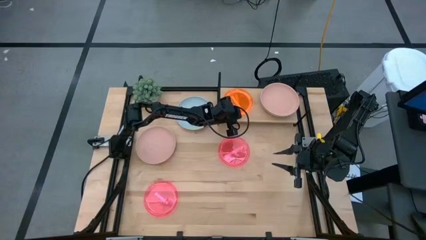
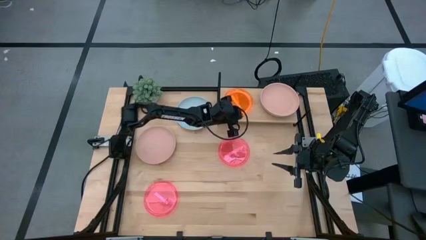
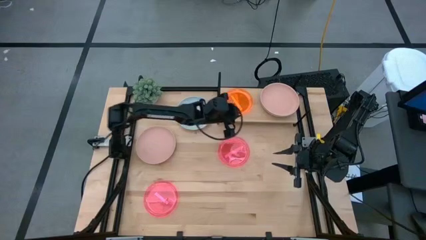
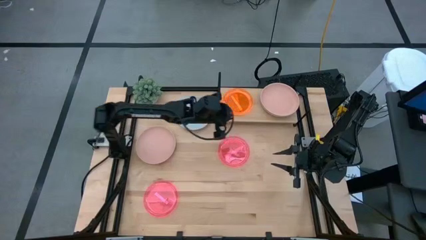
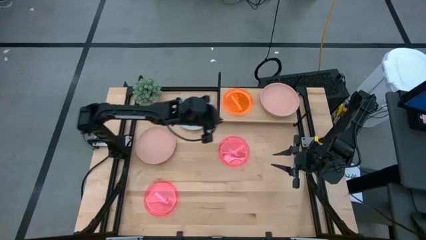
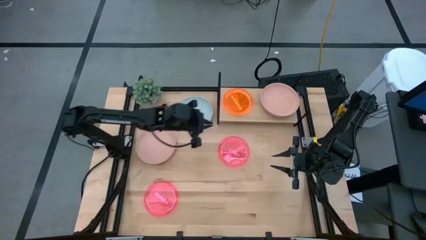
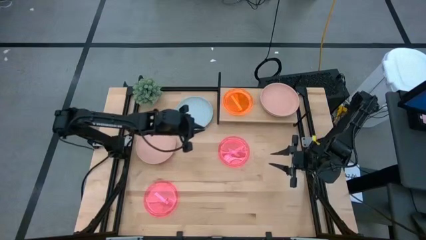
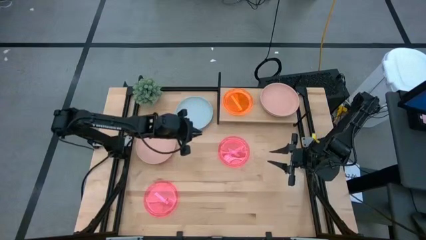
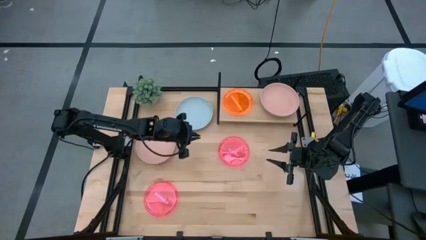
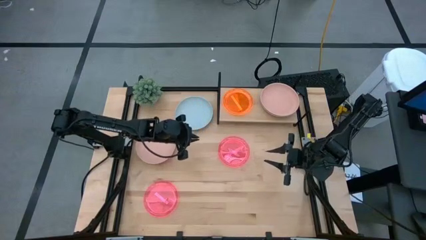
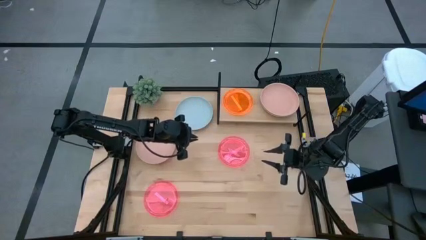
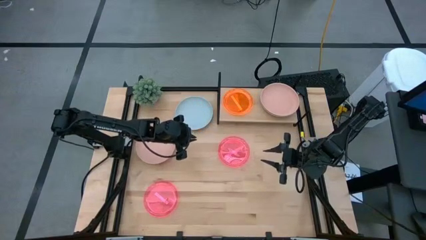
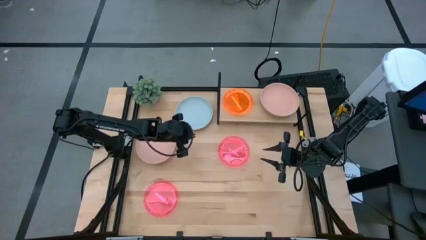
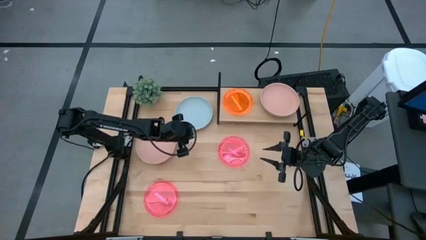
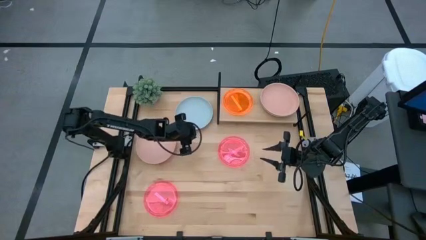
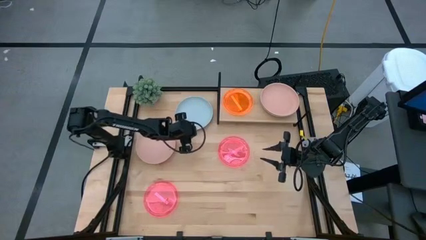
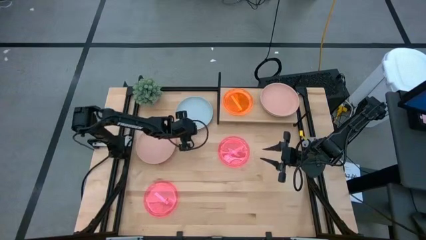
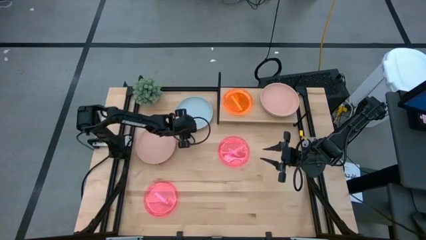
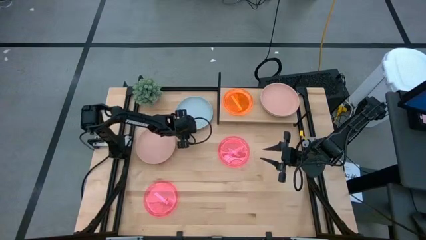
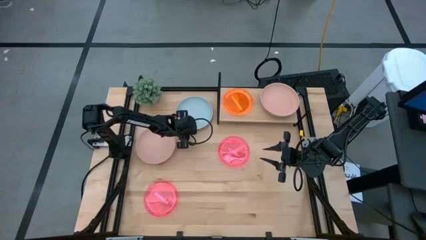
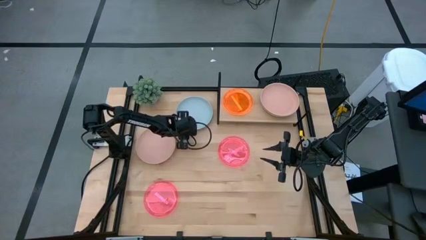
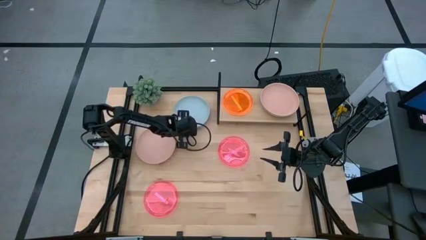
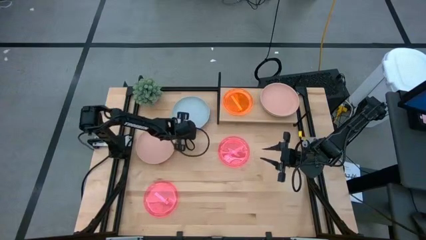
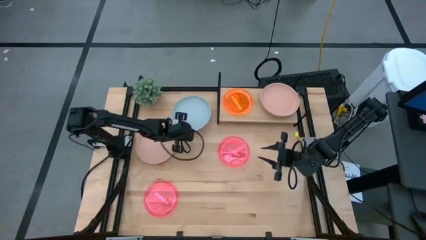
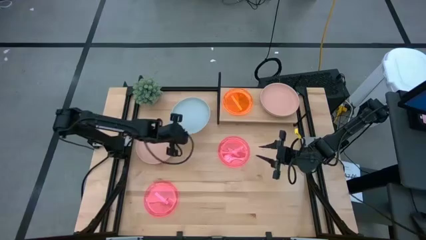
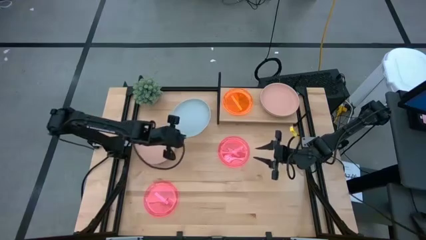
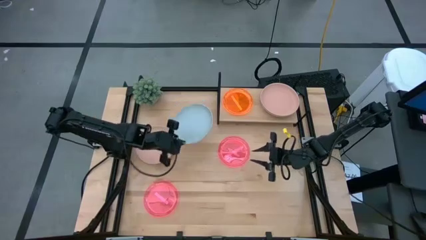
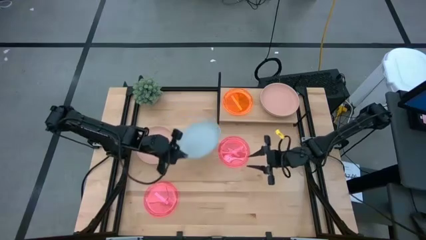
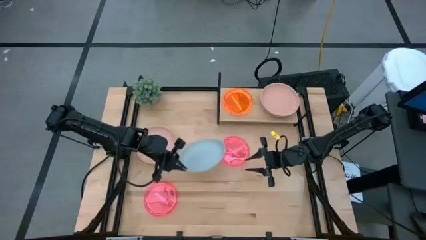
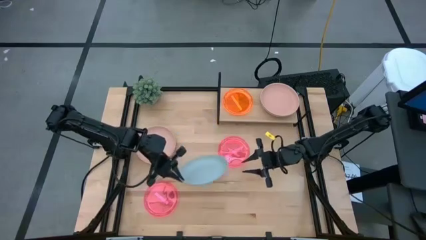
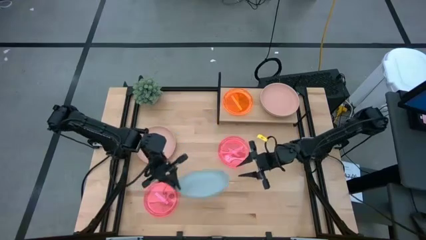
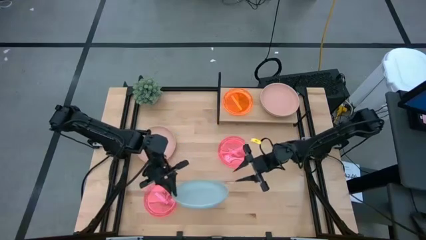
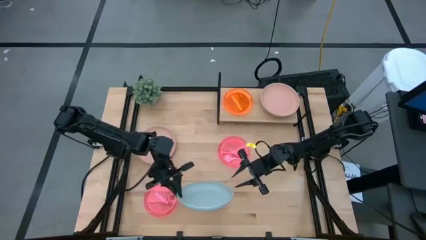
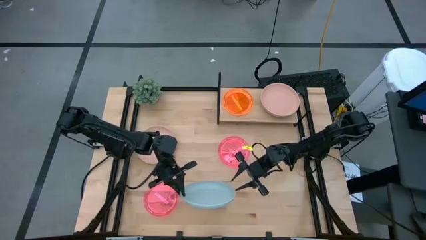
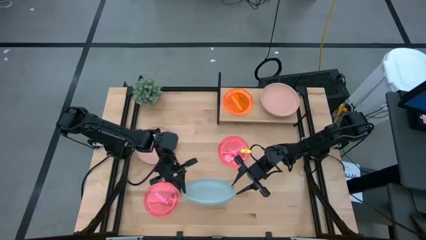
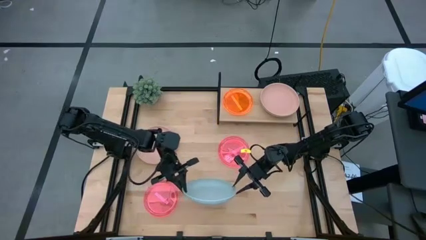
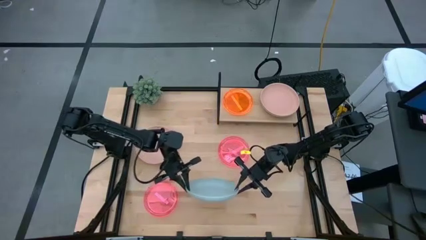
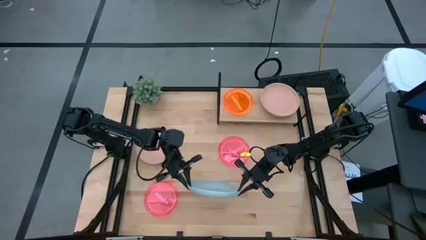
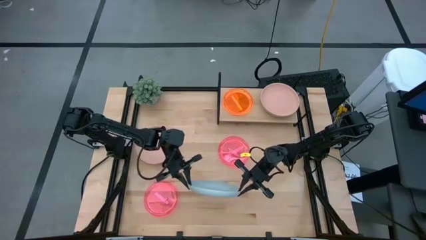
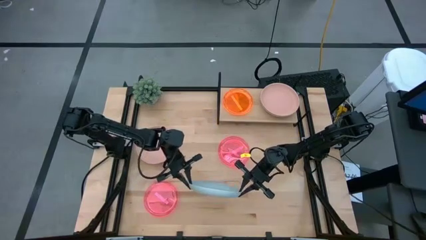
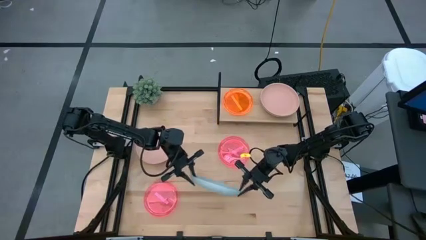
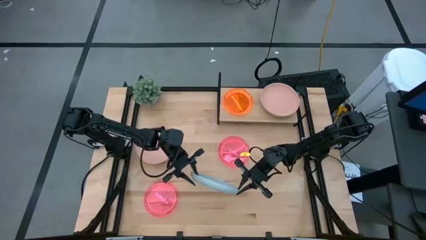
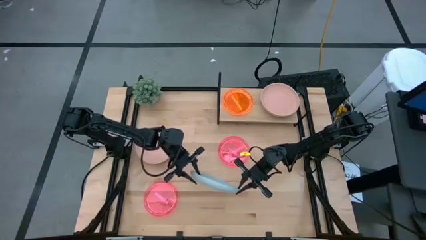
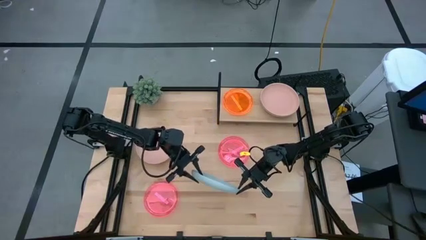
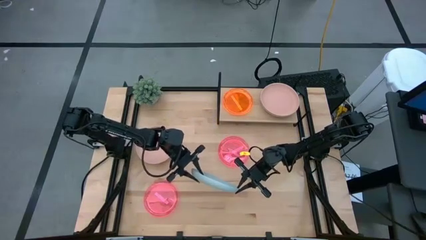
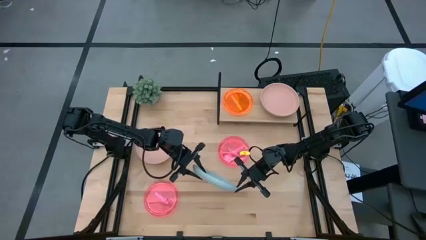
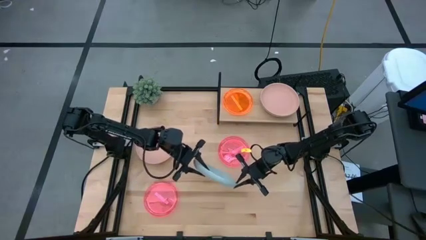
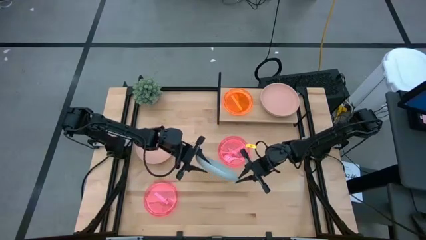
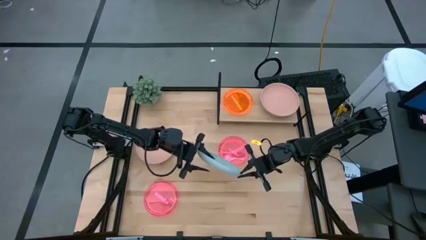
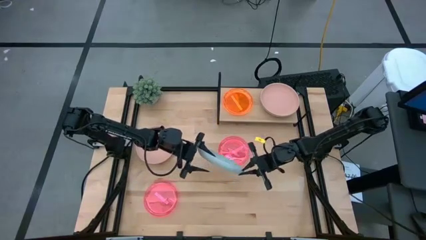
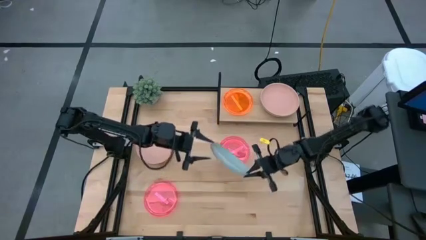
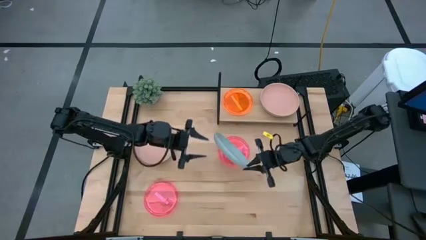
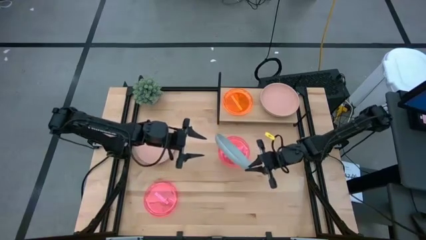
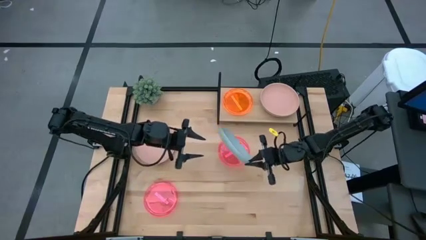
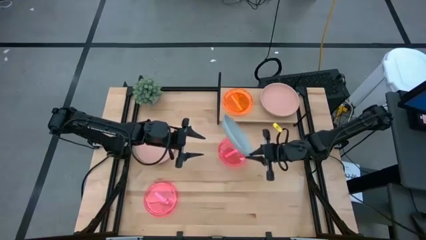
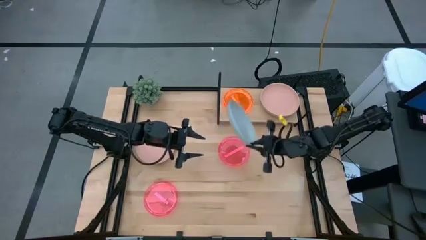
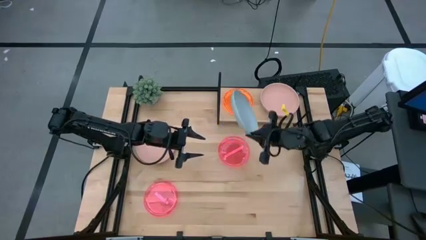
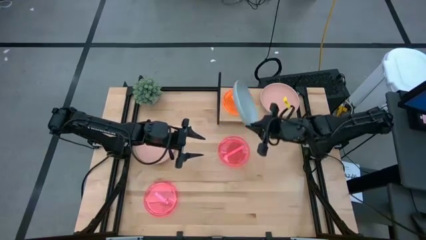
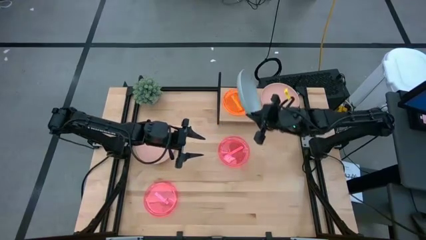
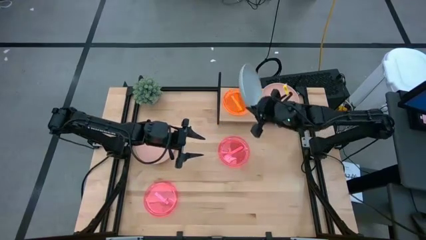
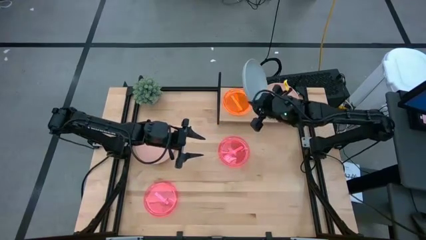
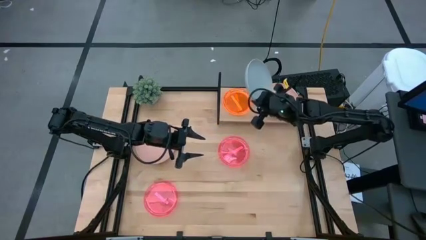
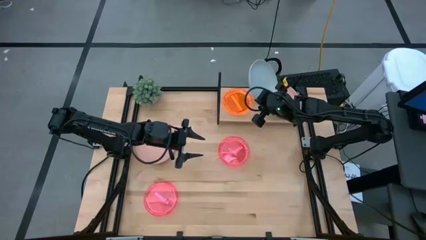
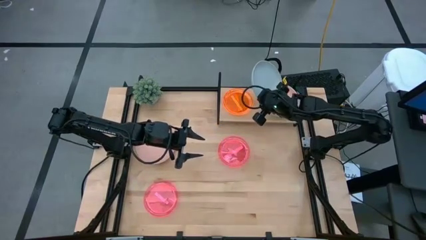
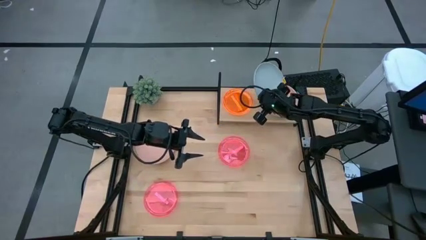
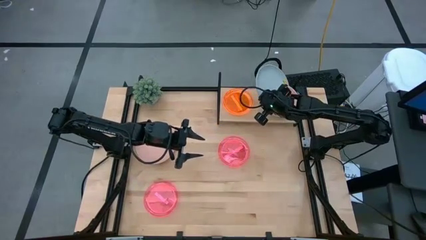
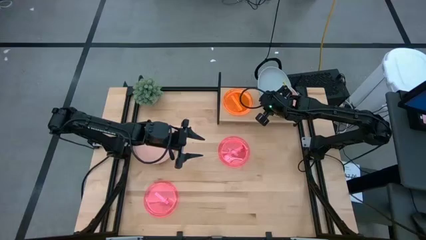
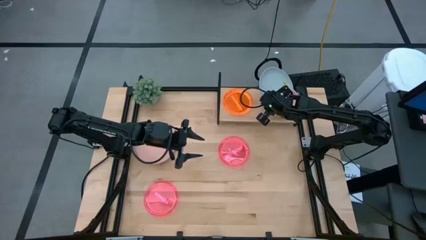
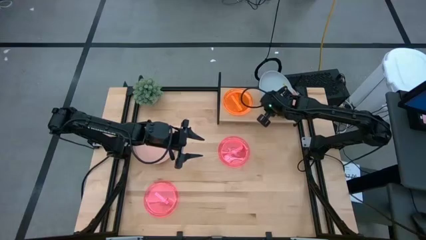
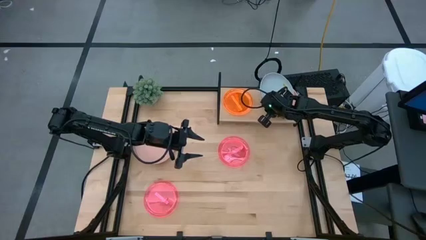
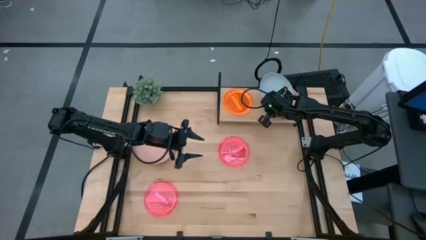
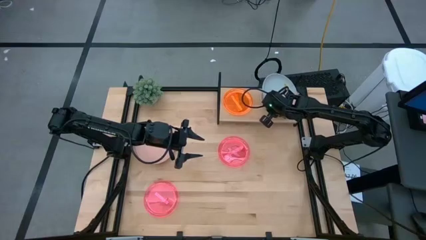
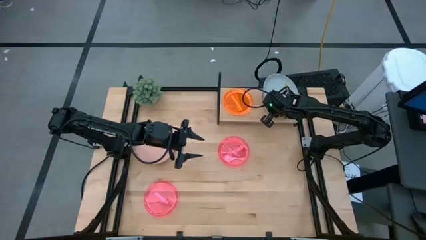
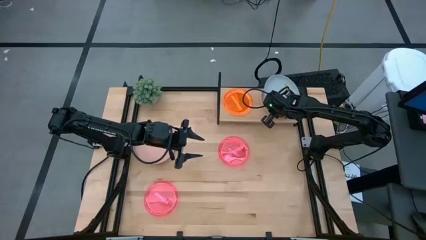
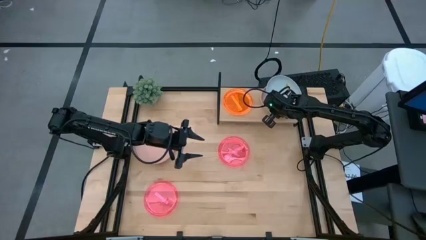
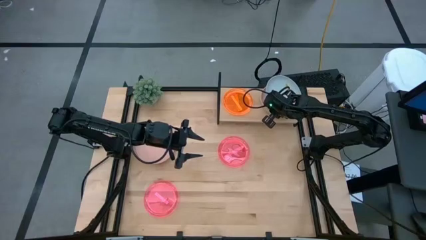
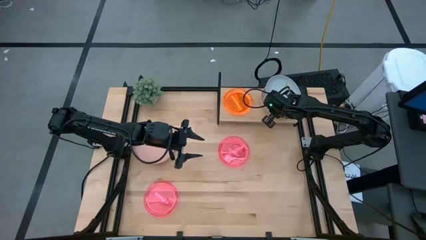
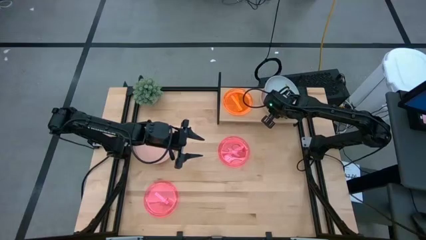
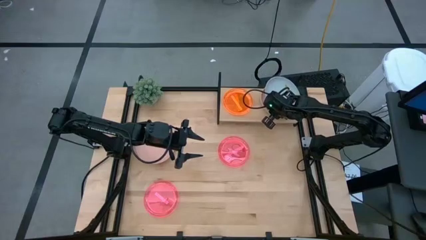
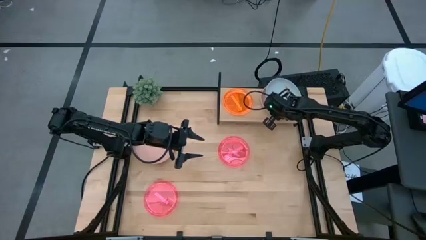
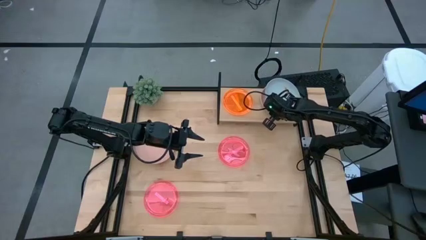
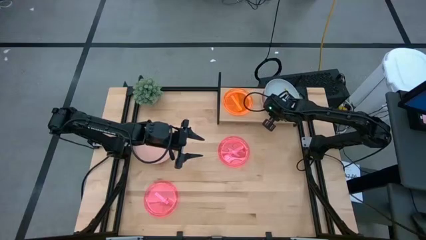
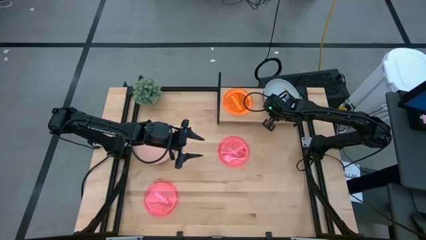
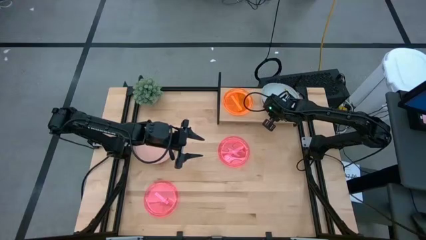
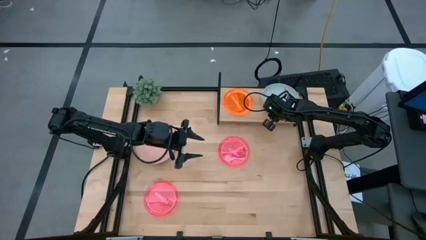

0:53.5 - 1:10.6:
Task: Place and stack plates onto a shelf
Stack the blue plate on top of the light pink plate on the shelf
